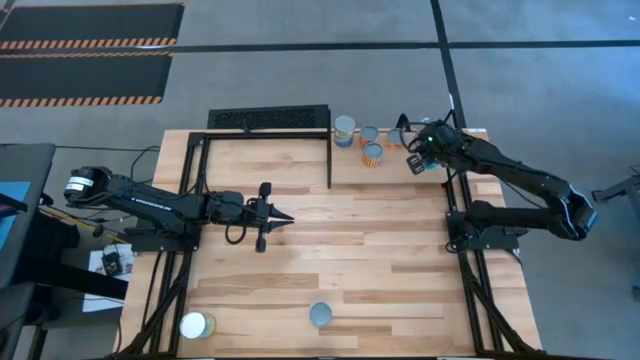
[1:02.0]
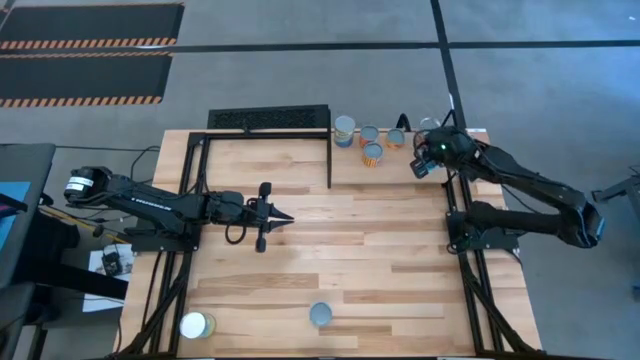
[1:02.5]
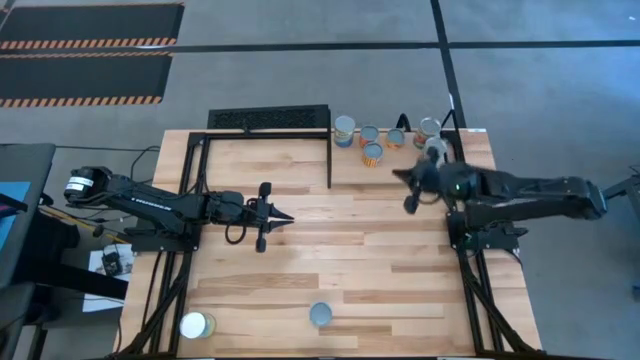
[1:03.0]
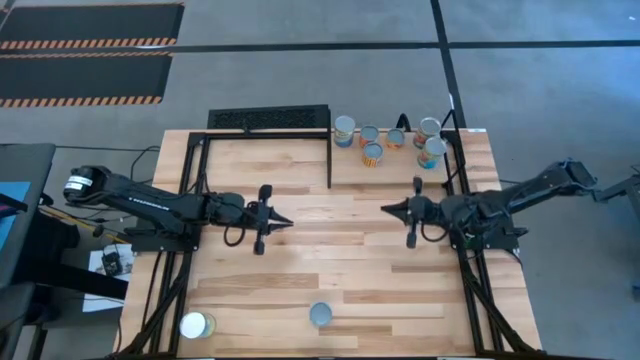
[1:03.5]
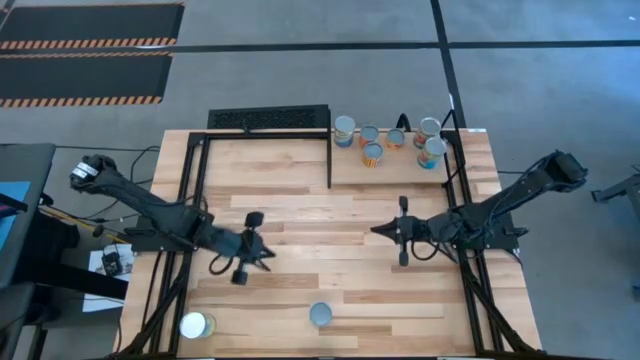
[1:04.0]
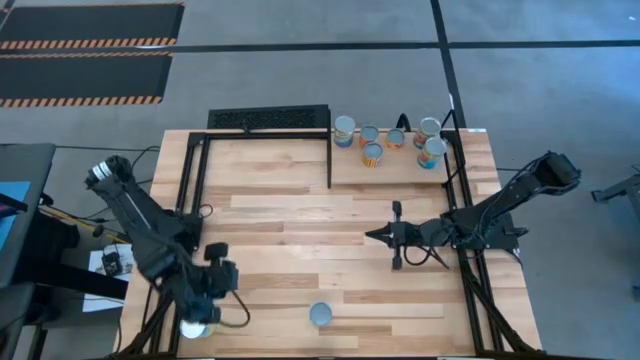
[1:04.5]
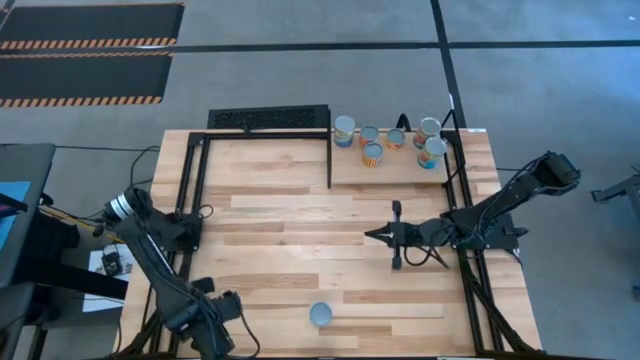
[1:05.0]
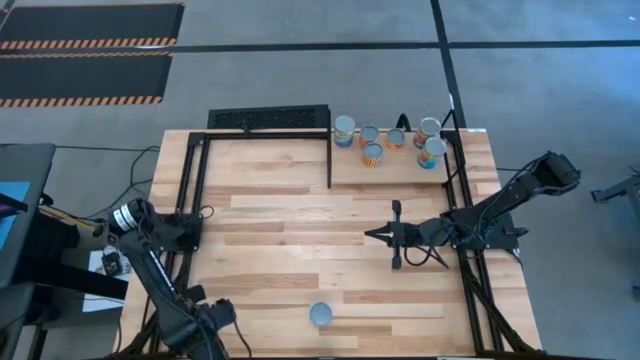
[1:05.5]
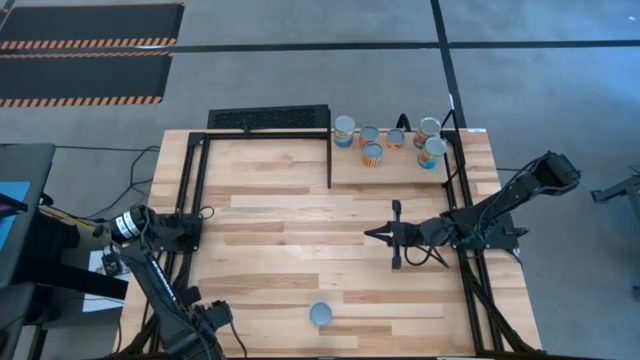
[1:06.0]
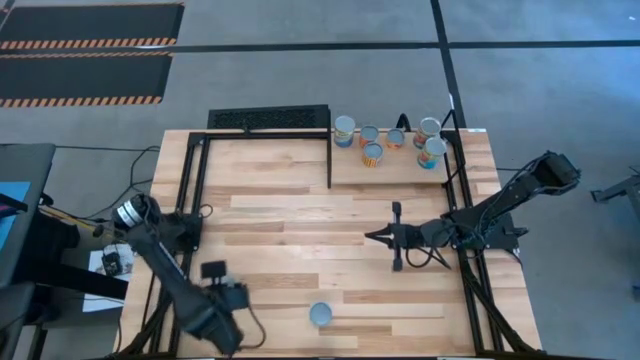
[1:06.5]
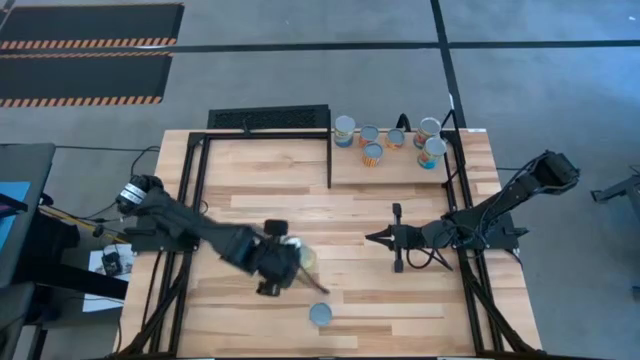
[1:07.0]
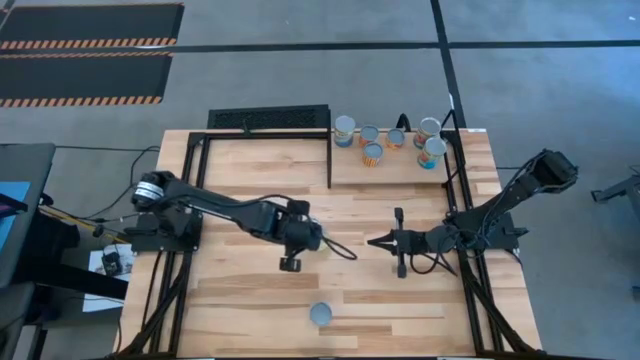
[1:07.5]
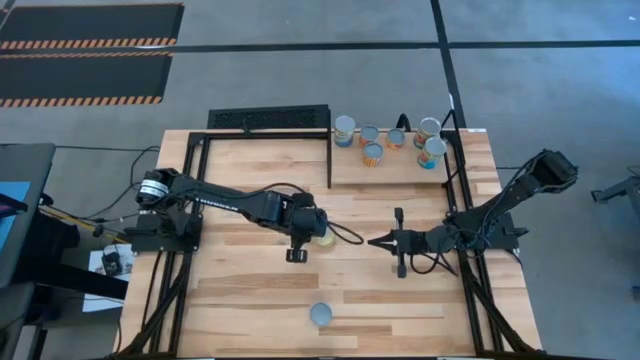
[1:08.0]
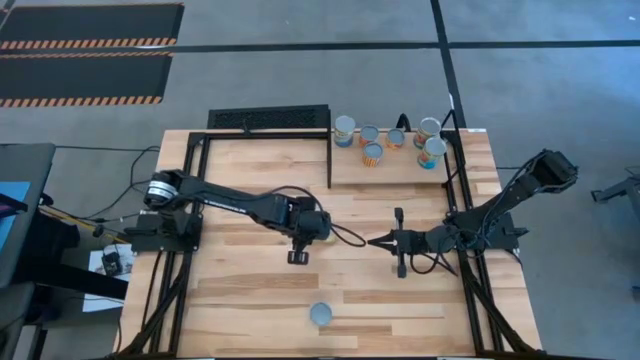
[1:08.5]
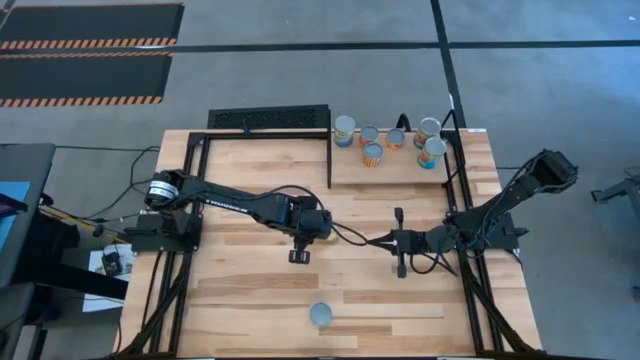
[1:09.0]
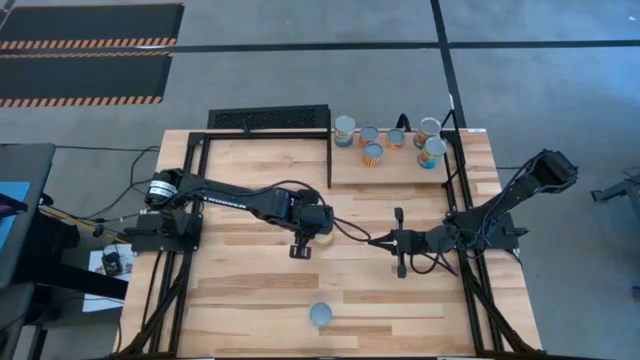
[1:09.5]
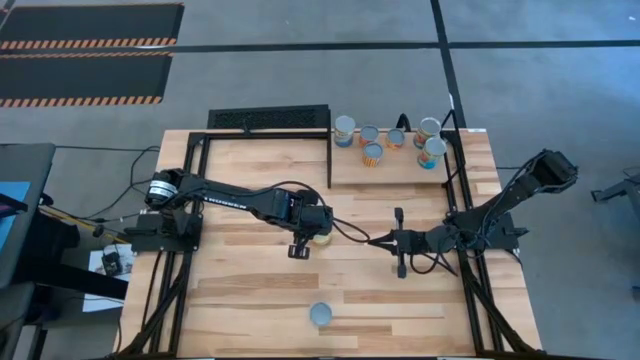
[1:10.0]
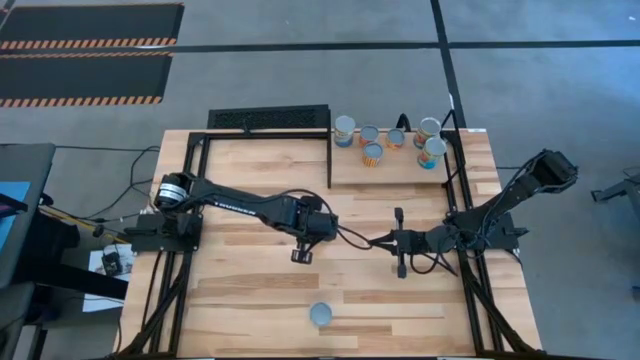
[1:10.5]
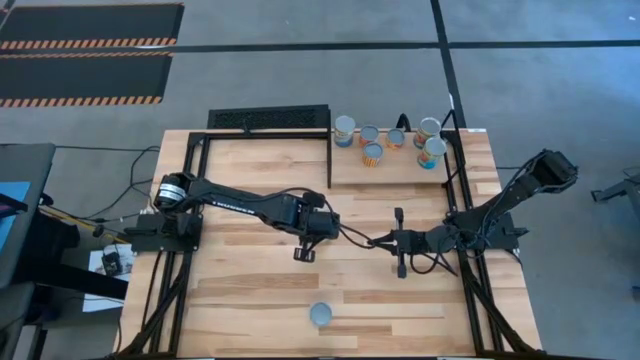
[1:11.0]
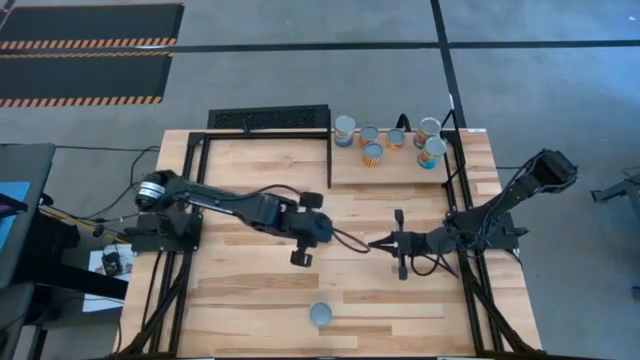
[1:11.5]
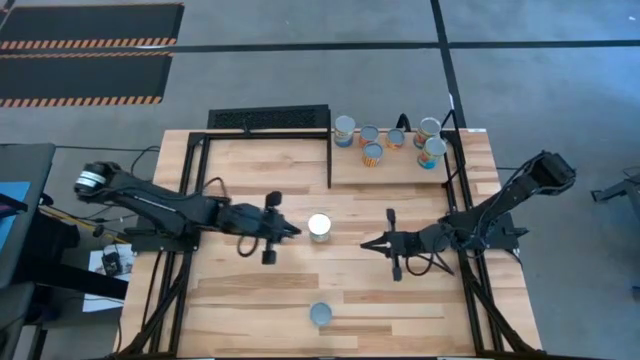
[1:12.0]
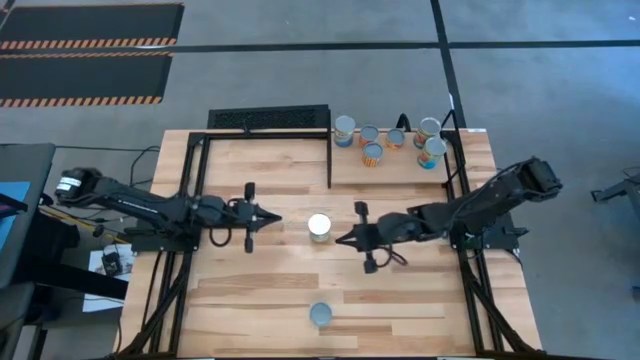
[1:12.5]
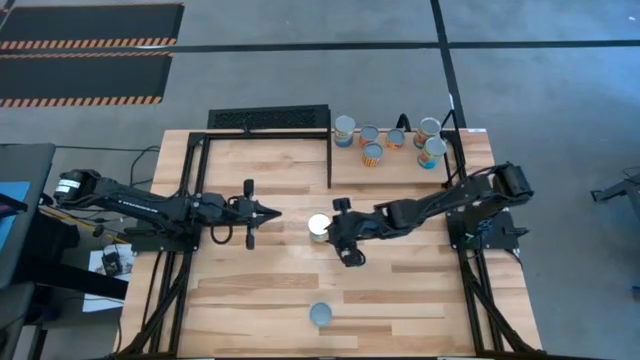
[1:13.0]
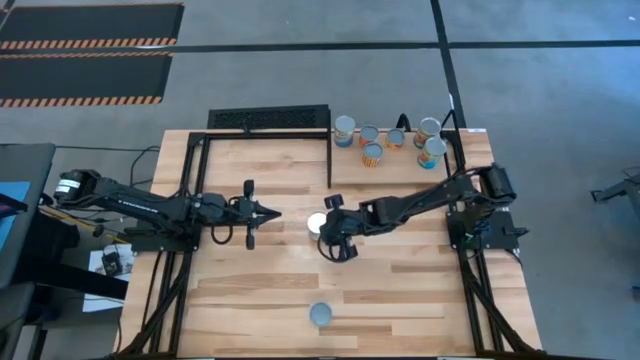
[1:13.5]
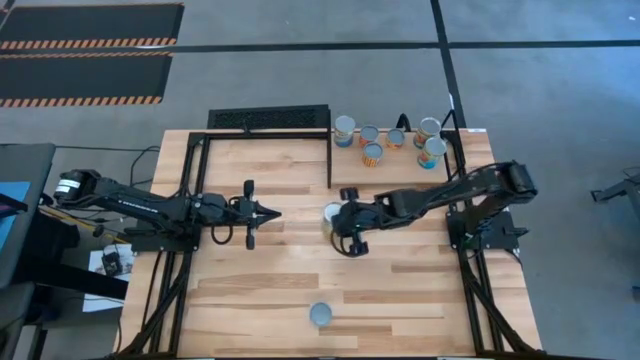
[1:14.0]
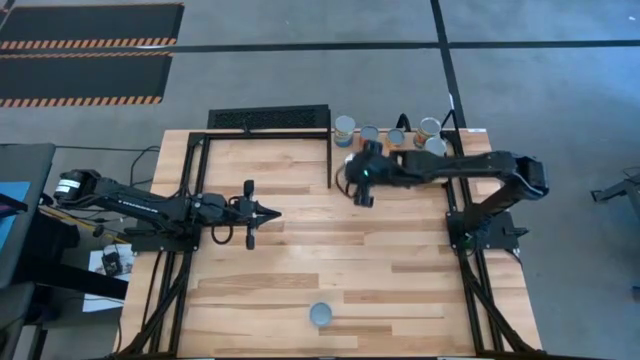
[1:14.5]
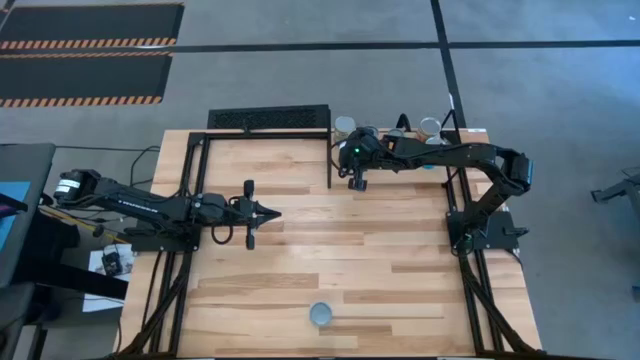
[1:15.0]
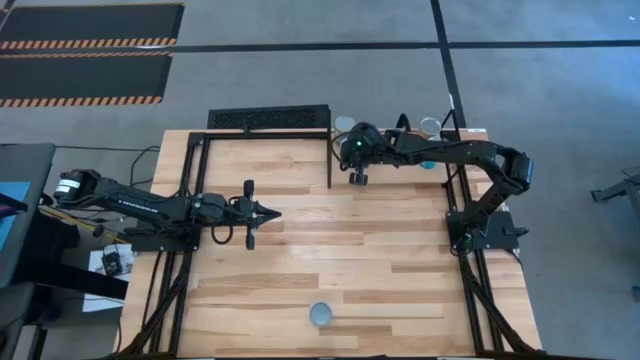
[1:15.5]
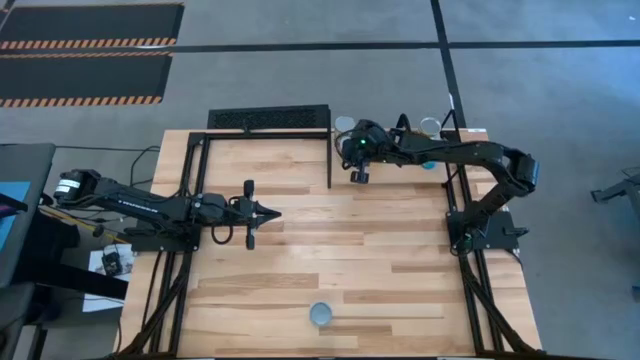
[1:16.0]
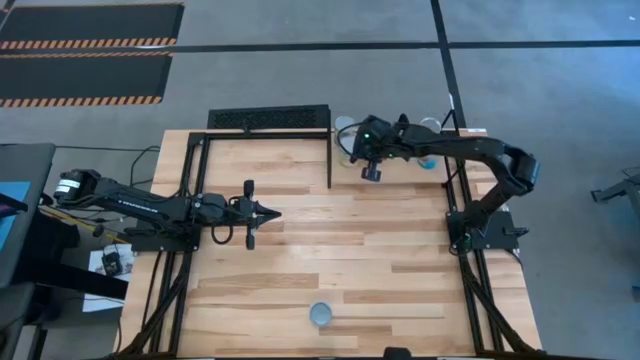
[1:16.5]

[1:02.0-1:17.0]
Task: Pick and place cans onto a shelf
Put the canned carrots on the shelf

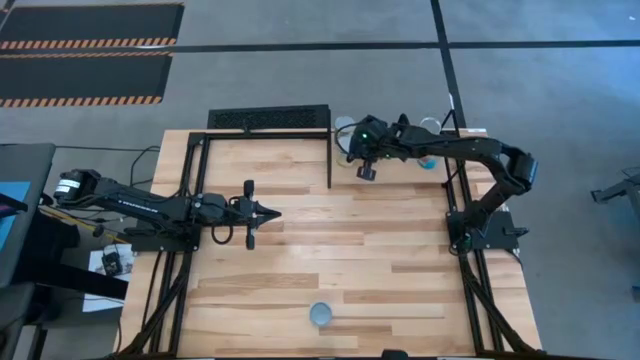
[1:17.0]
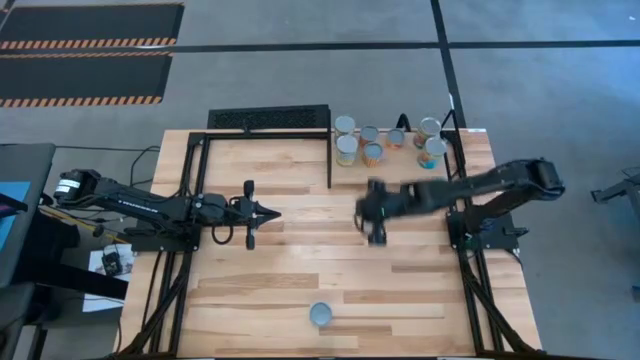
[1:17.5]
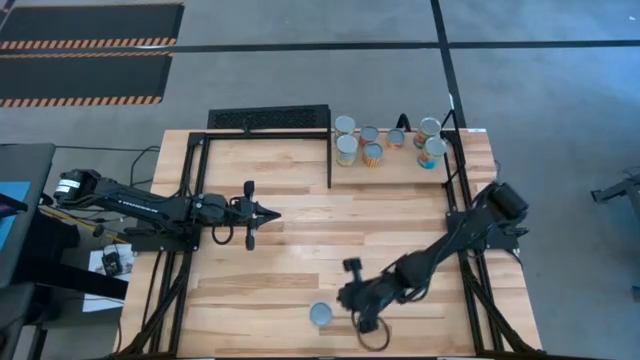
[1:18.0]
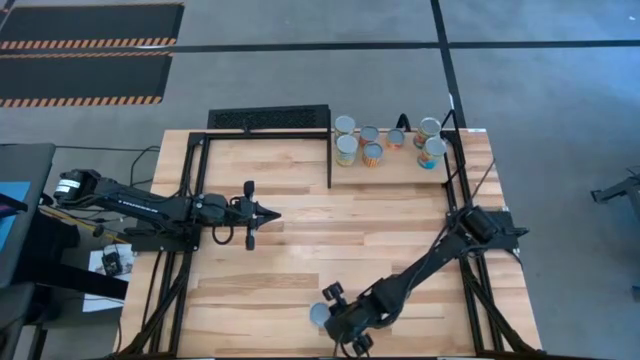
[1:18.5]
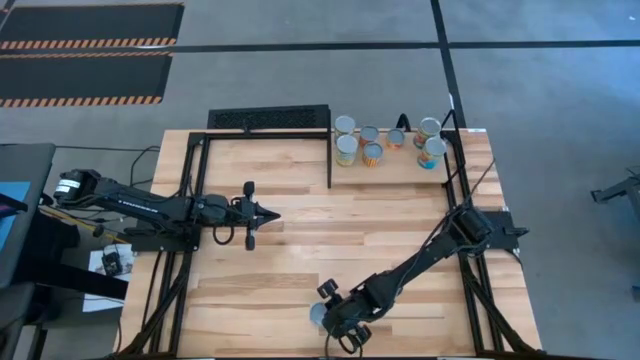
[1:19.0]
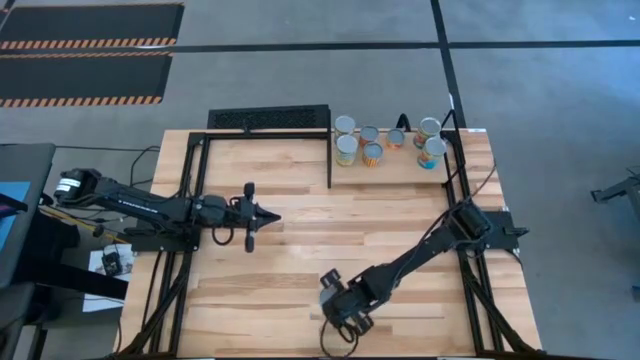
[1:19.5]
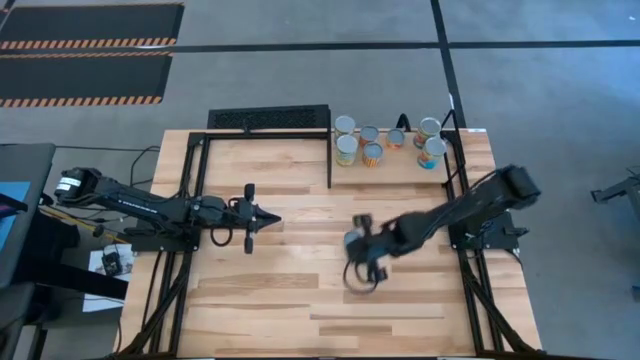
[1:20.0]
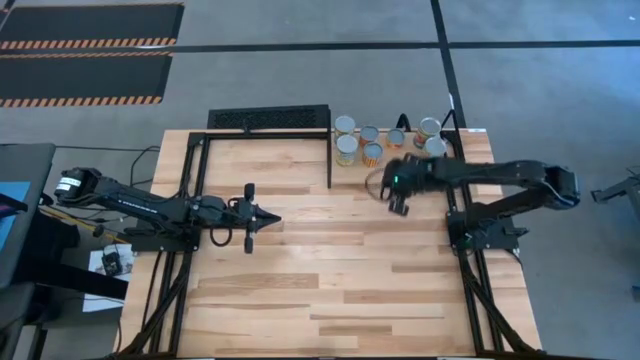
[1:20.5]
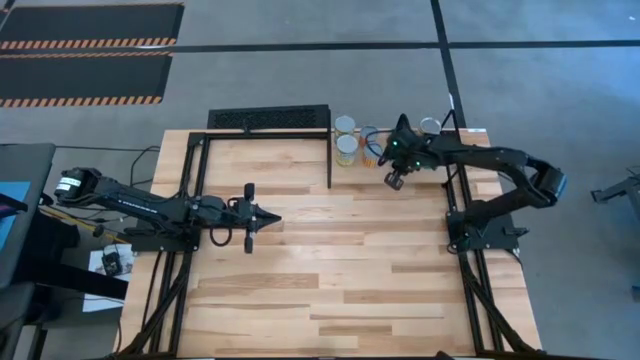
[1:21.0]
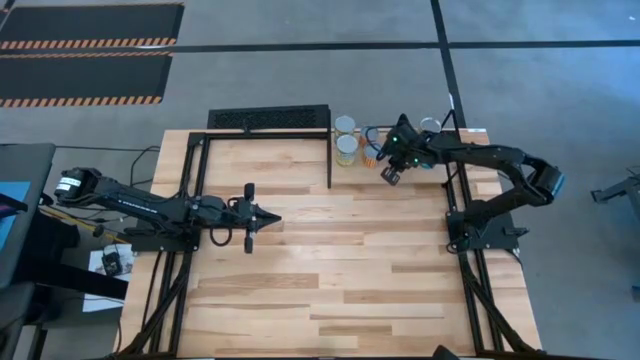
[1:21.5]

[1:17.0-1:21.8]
Put the pink salmon tuna can on the shelf

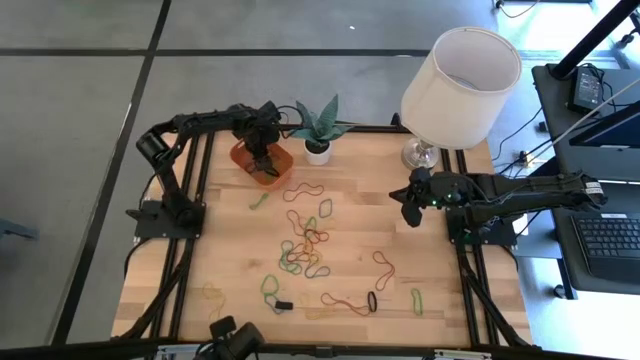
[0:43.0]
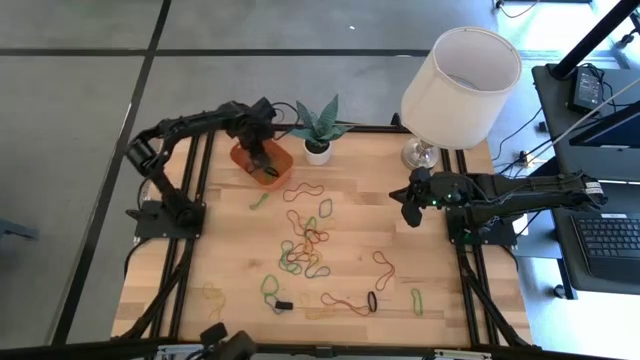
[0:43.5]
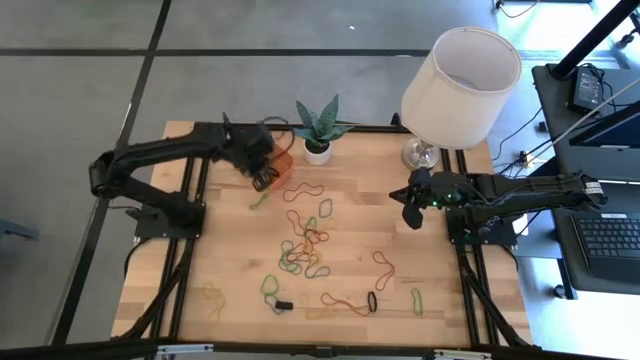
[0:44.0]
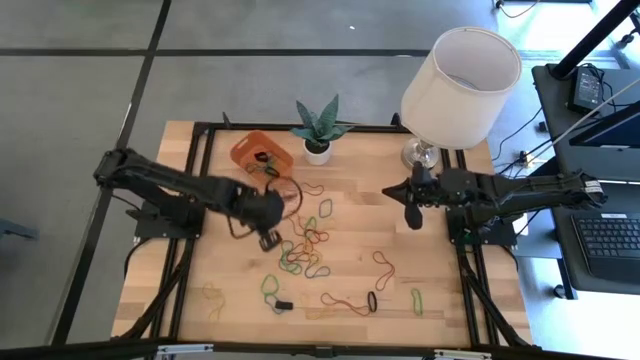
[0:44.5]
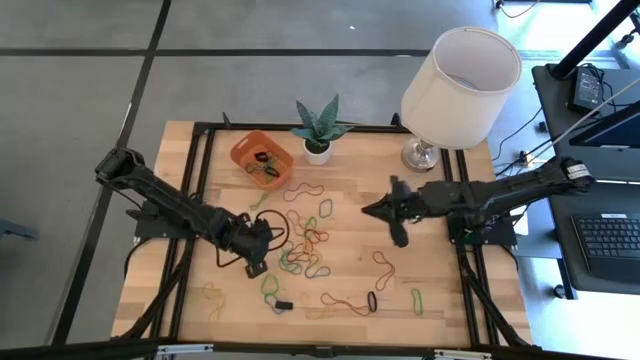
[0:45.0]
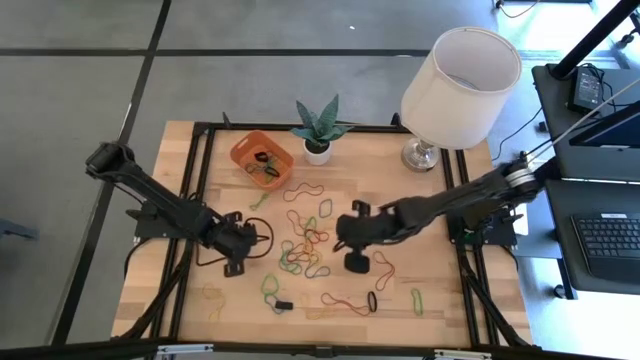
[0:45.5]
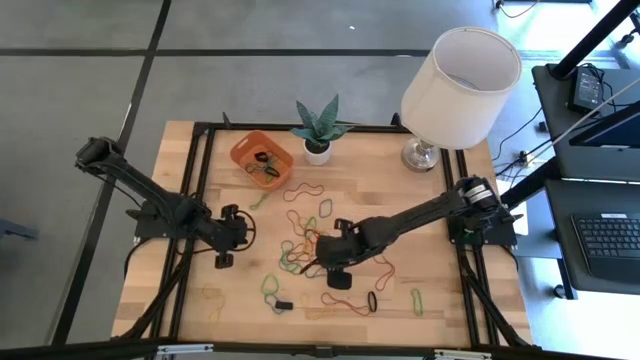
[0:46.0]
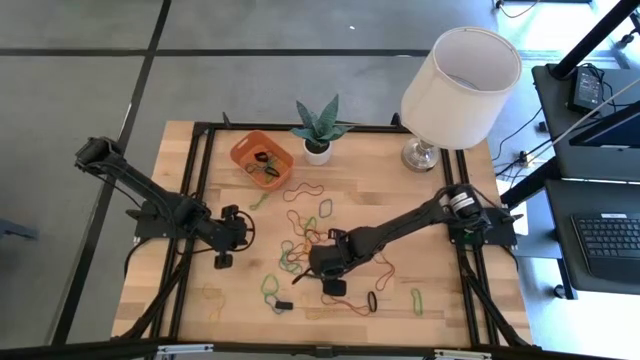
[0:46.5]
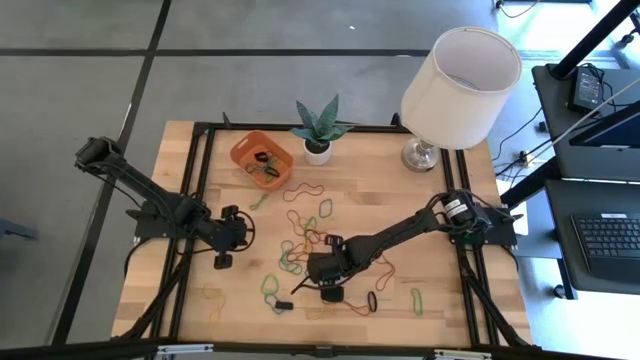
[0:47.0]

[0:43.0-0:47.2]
Task: Pick and place rubber bands into bin
Put the blue rubber band into the orange bin
